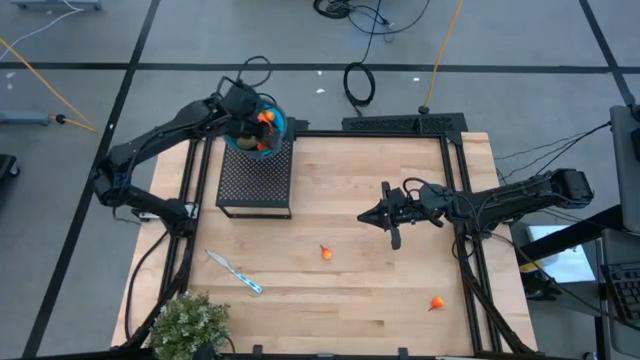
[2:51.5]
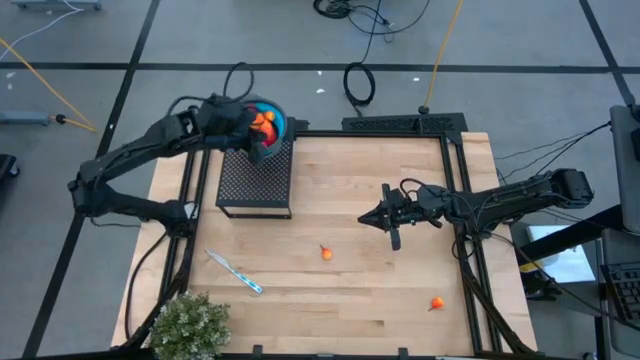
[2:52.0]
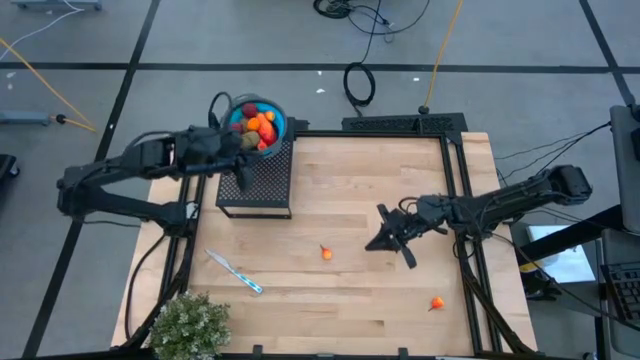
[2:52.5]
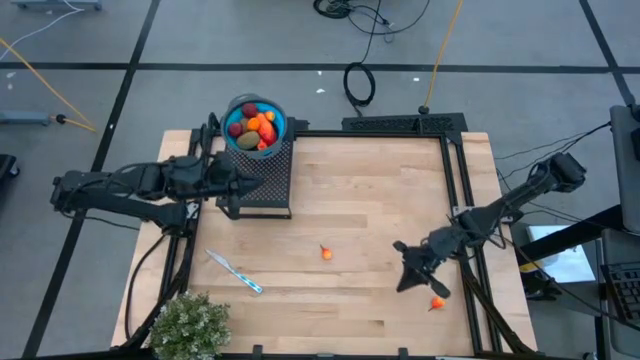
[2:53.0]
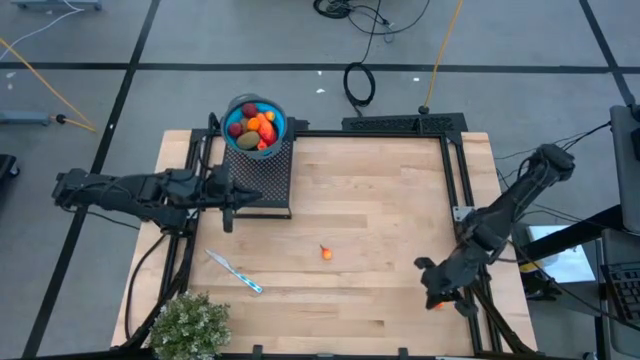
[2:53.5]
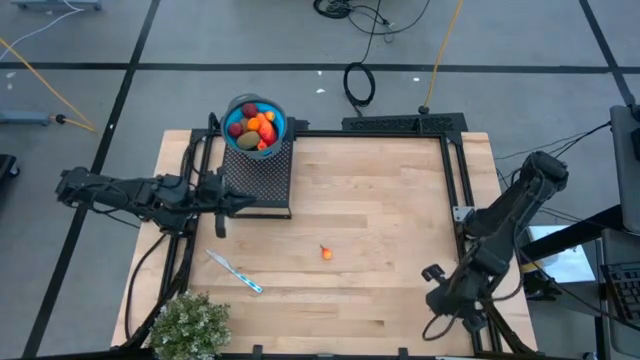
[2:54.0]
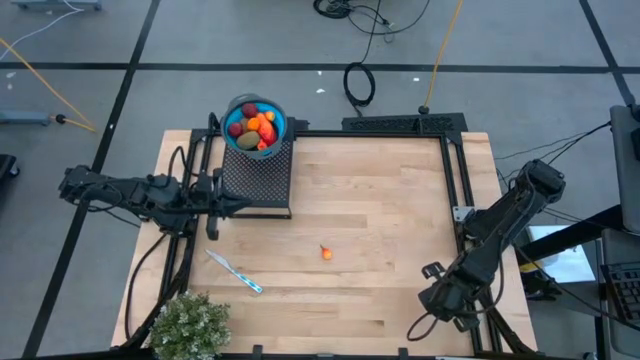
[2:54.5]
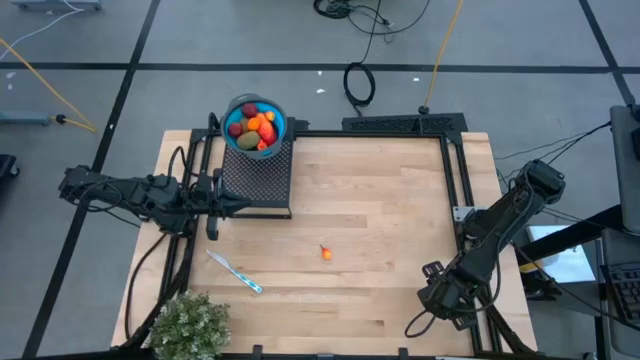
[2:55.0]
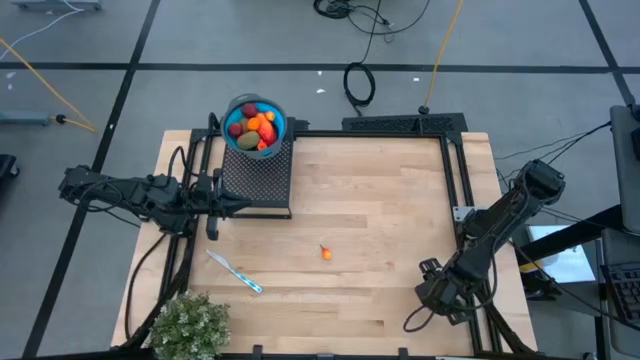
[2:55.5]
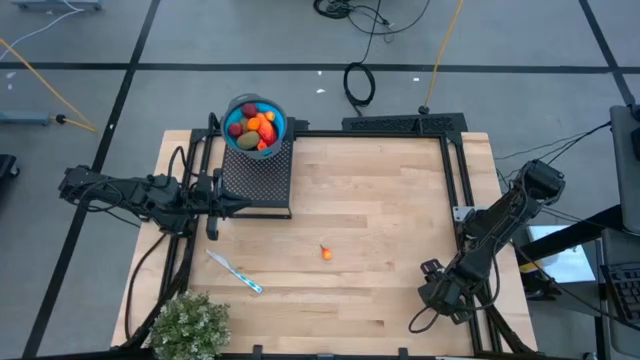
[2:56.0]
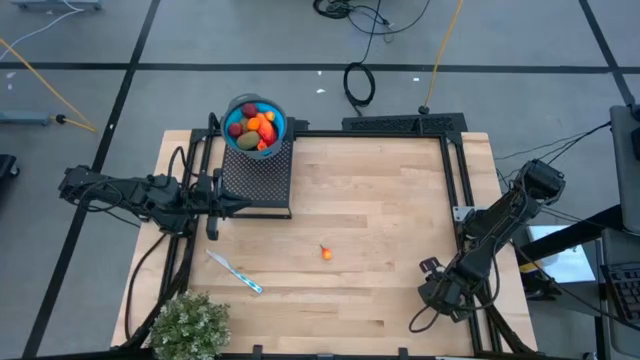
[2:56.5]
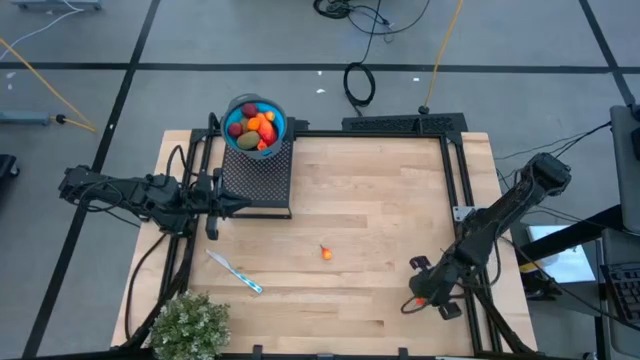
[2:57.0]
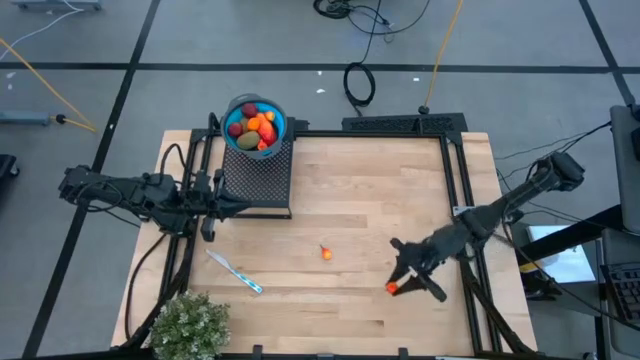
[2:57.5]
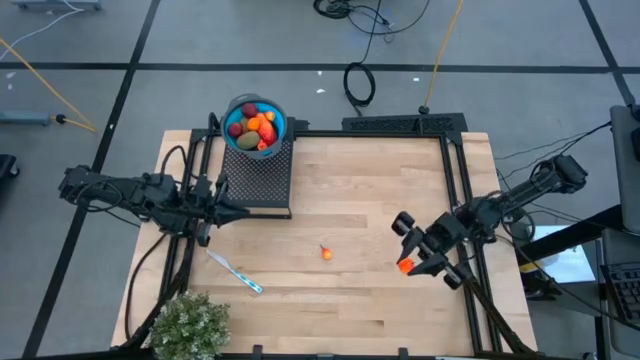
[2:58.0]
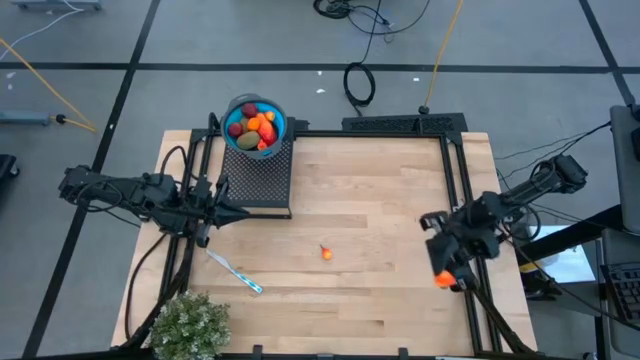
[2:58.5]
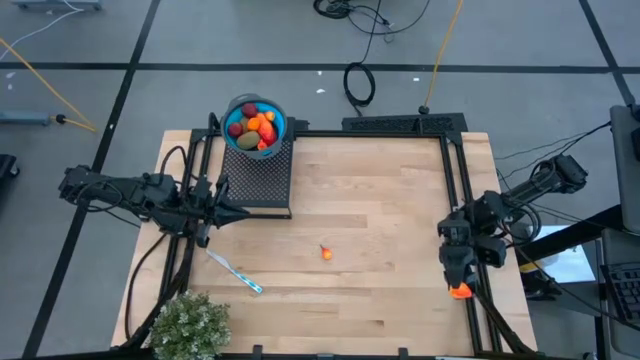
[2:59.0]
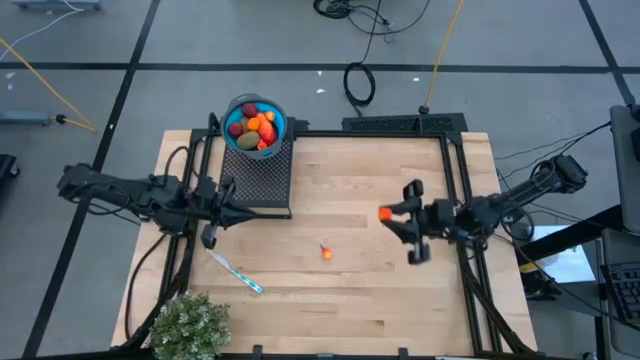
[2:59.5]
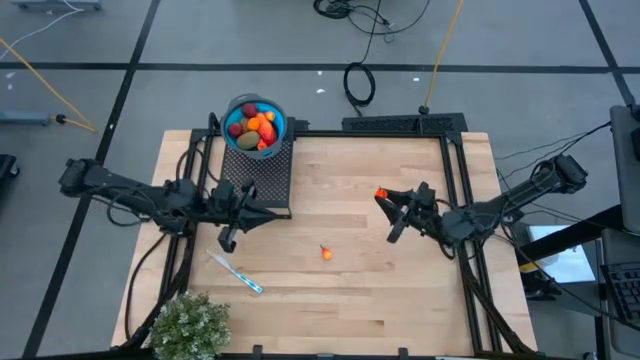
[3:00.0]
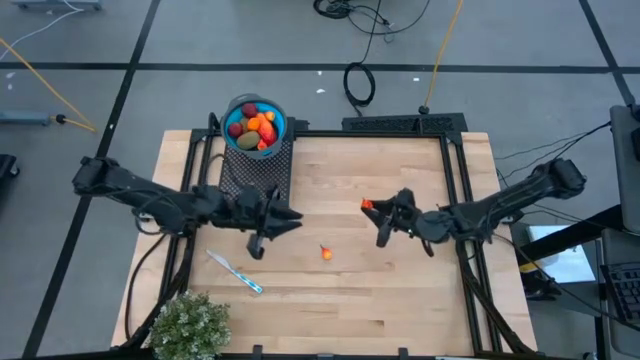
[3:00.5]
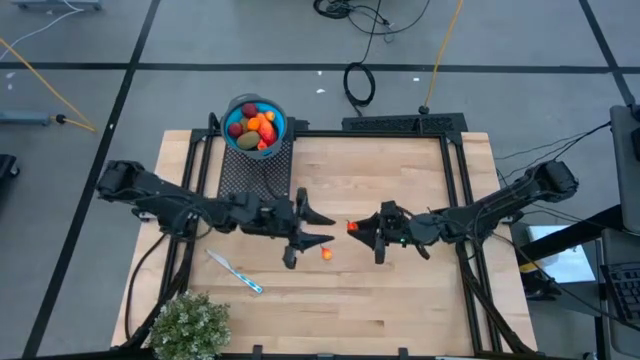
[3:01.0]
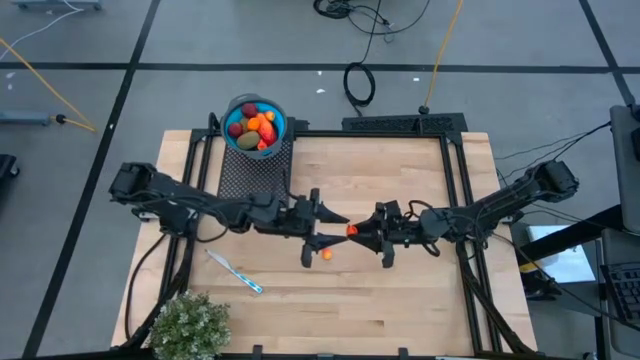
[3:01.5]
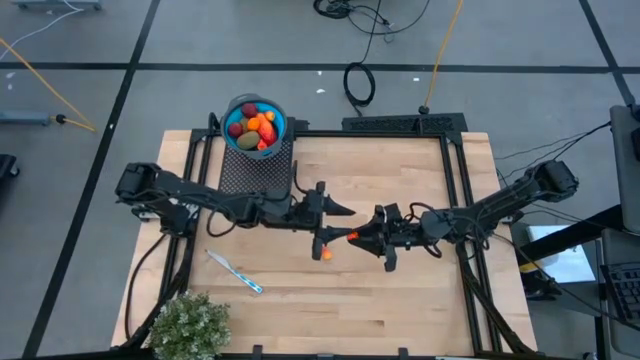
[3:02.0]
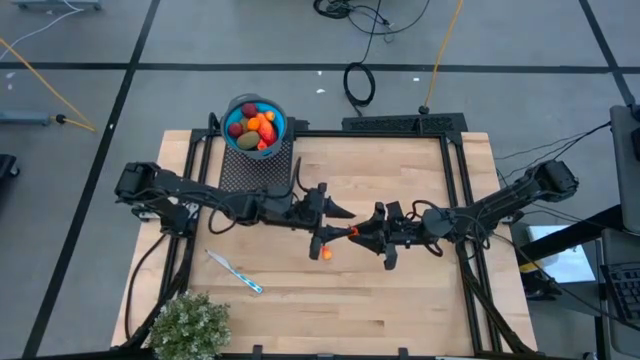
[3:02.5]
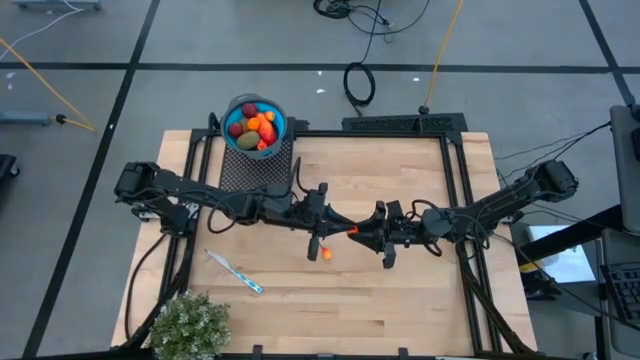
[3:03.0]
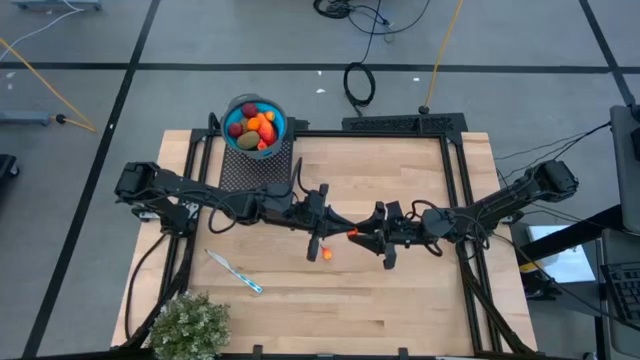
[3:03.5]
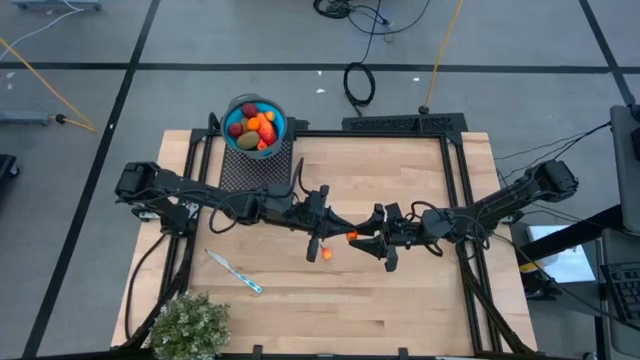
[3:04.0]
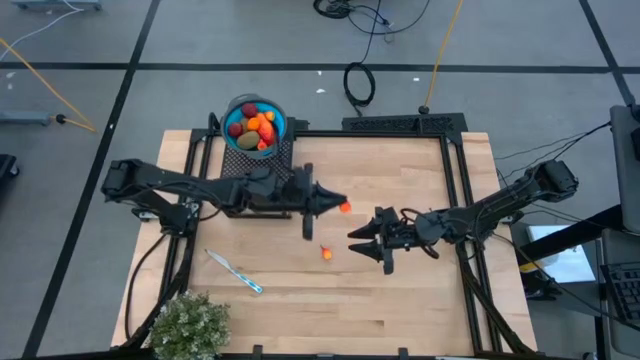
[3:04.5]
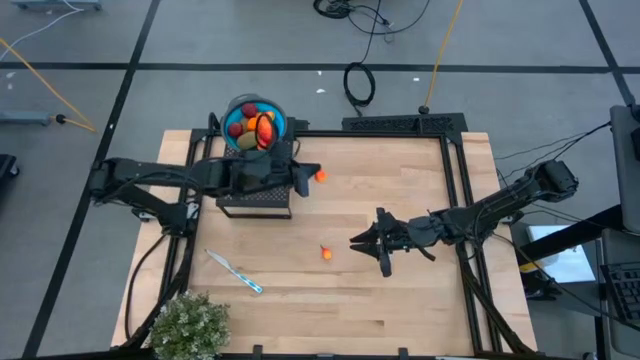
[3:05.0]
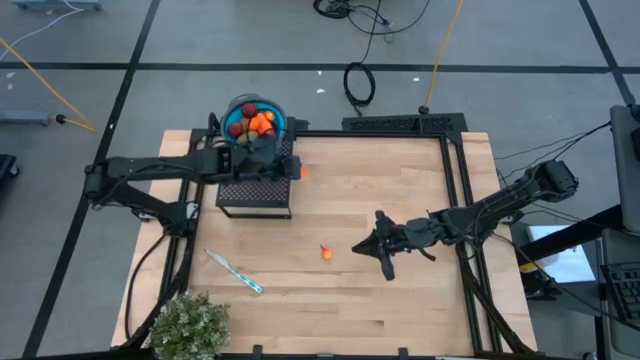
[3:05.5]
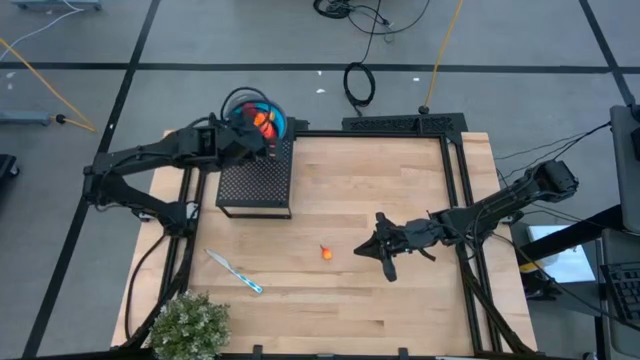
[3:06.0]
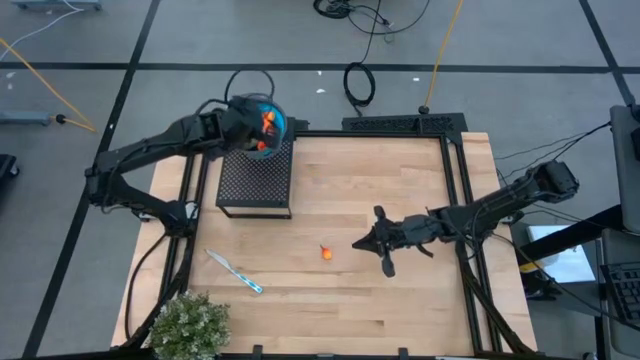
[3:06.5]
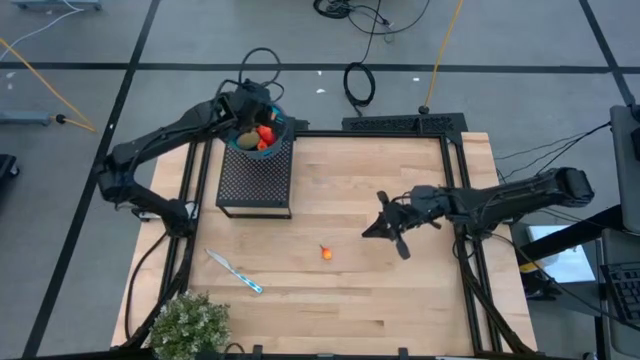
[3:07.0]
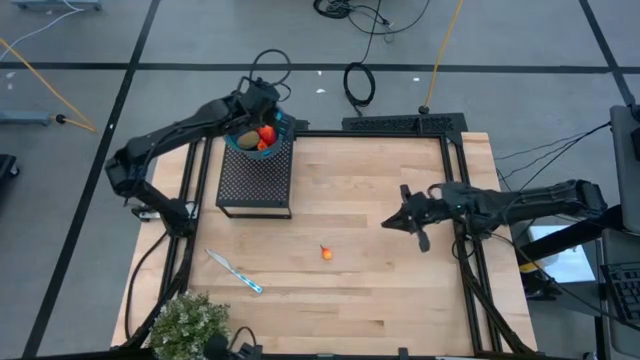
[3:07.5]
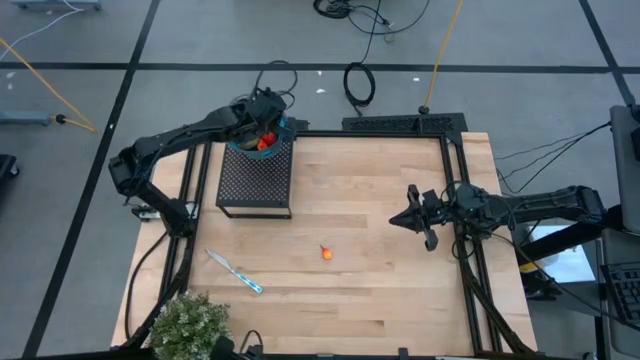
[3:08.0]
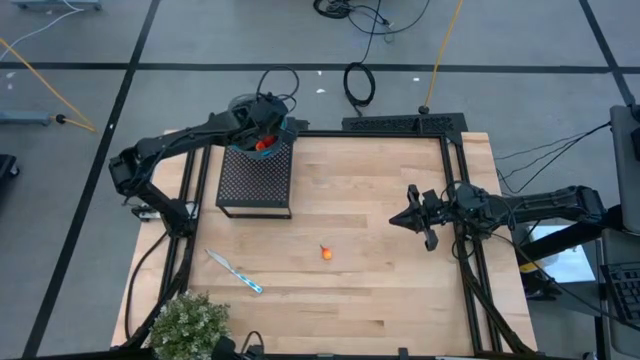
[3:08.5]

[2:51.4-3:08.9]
Task: Pick & Place Fruit
Put the pear into the blue strainer bowl on the shelf

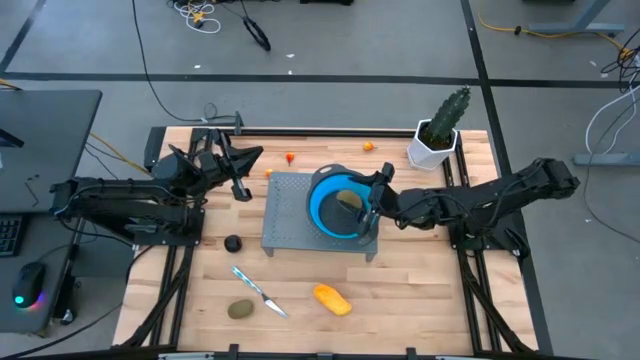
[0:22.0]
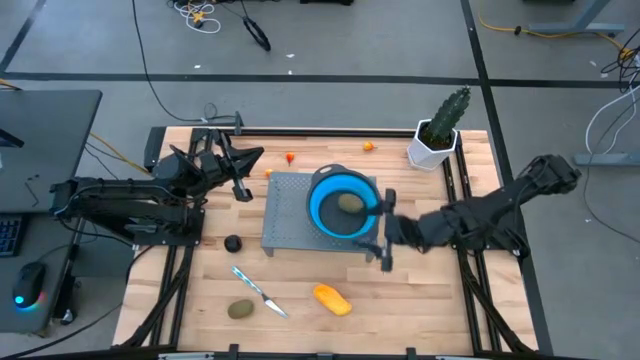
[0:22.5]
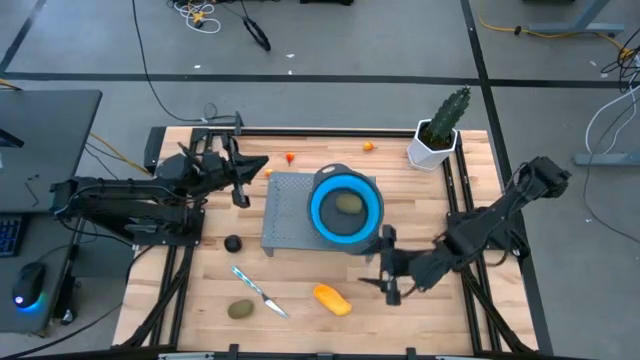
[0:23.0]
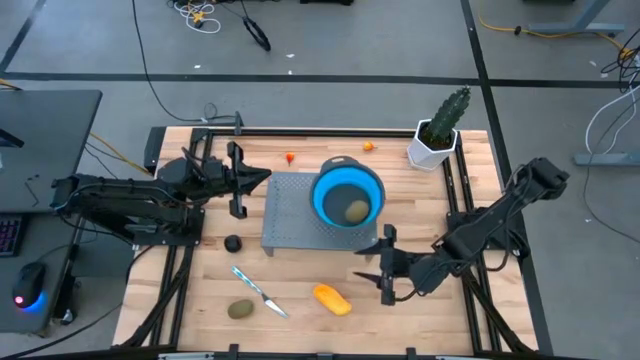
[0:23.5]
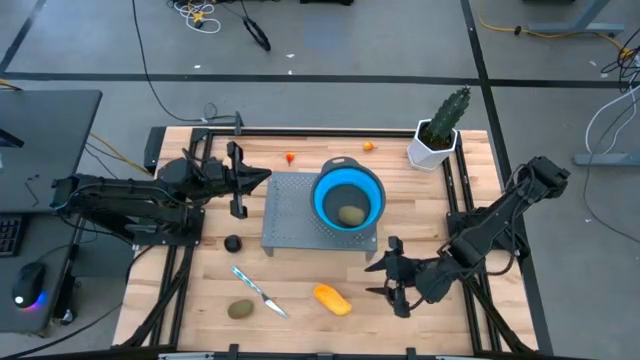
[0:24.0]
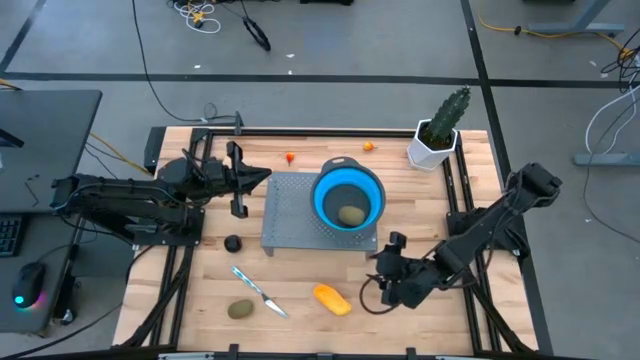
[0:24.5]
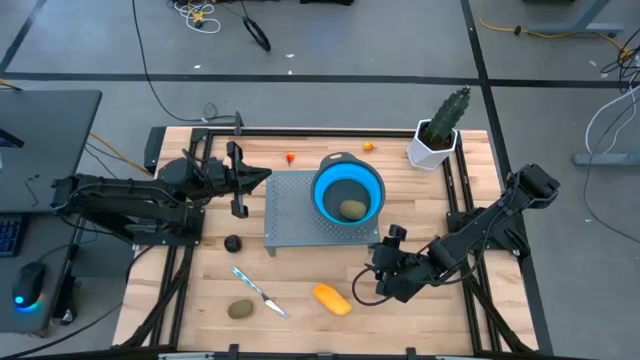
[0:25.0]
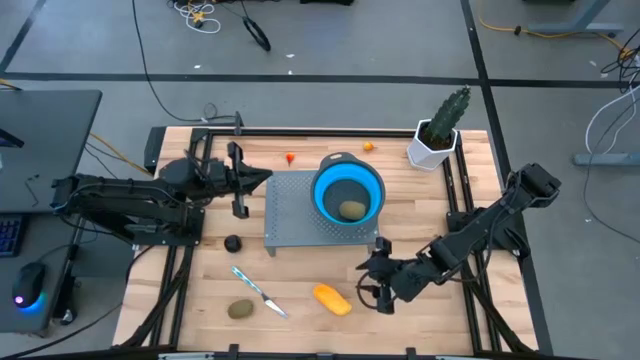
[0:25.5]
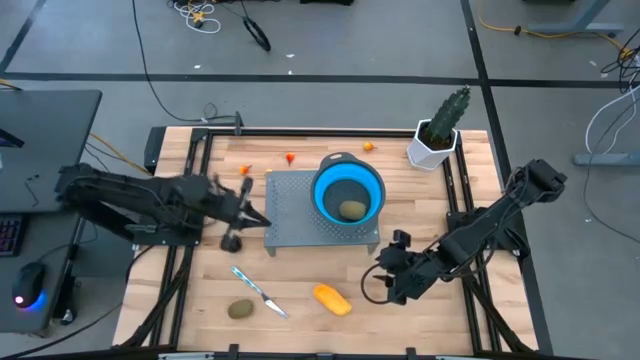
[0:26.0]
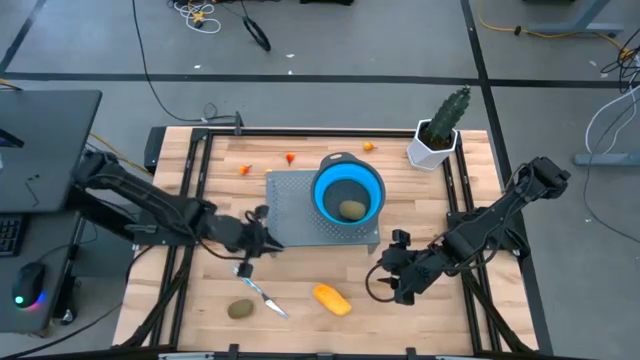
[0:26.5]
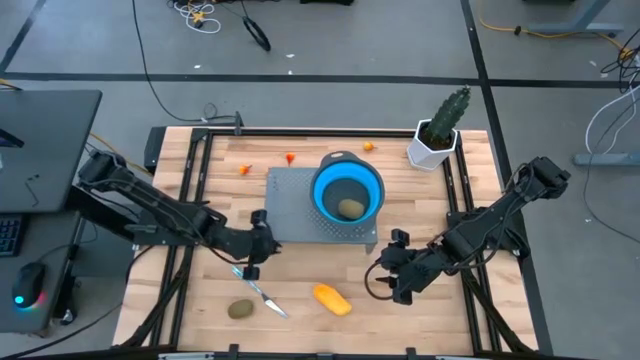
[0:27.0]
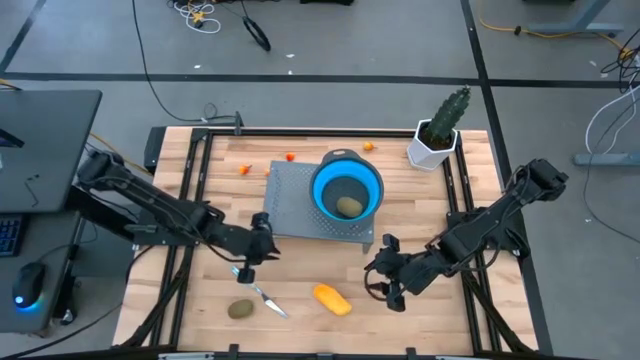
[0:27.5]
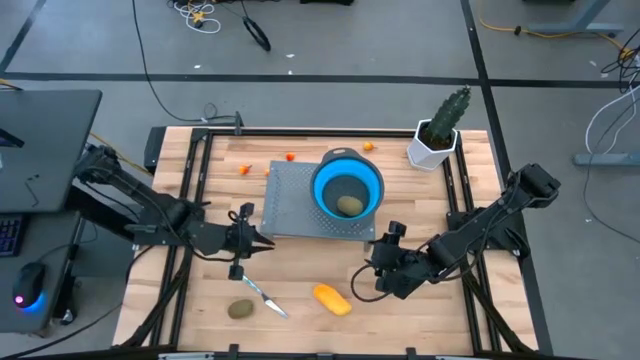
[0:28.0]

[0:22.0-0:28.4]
Task: Pick & Place Fruit
Adjust the shelf
